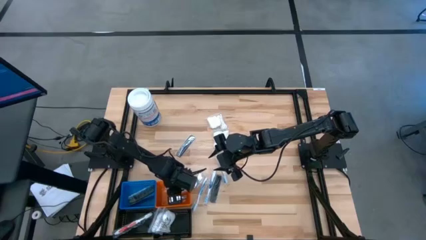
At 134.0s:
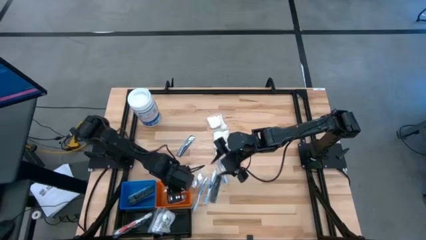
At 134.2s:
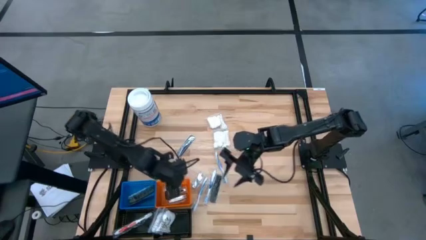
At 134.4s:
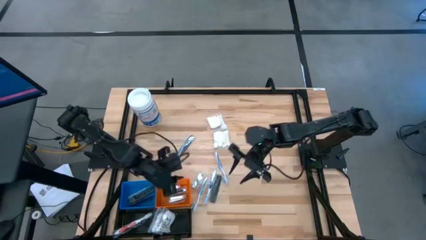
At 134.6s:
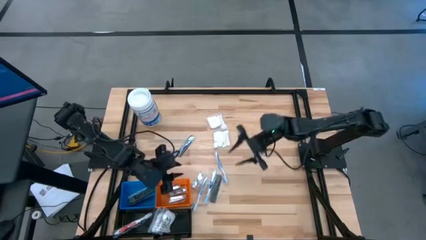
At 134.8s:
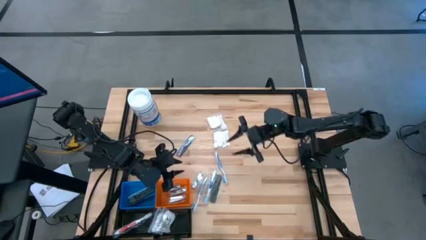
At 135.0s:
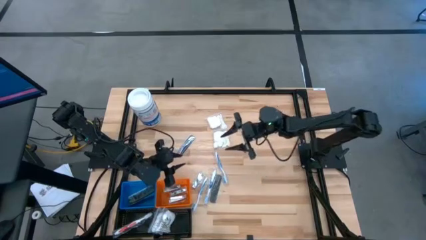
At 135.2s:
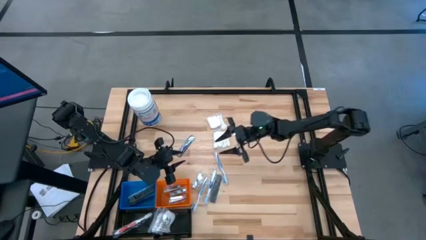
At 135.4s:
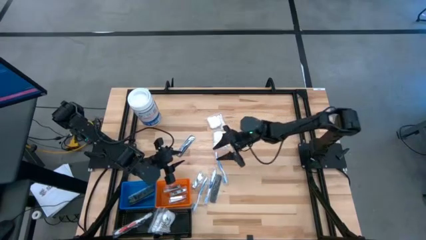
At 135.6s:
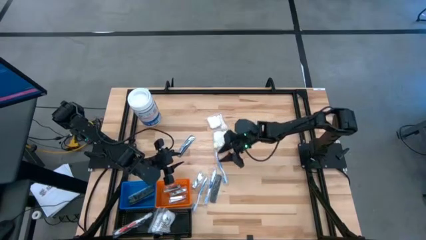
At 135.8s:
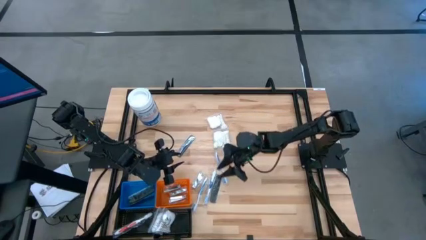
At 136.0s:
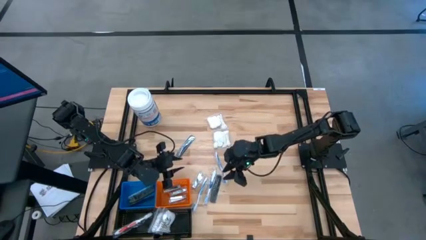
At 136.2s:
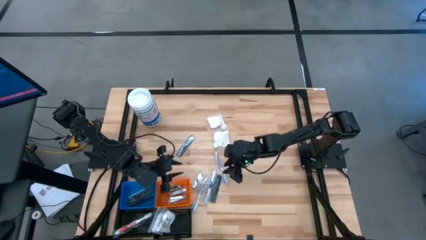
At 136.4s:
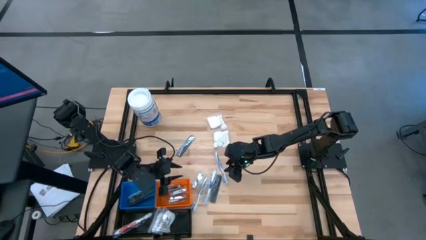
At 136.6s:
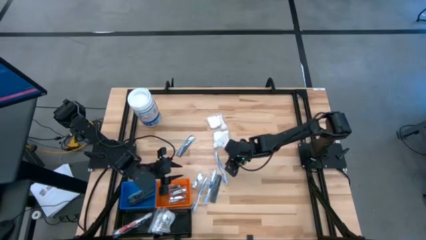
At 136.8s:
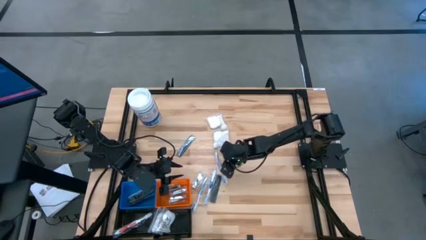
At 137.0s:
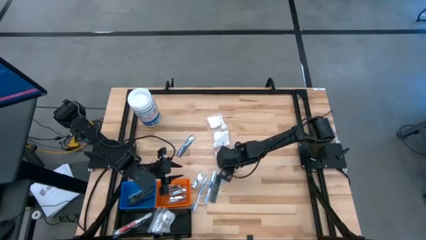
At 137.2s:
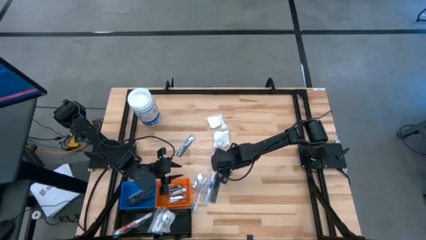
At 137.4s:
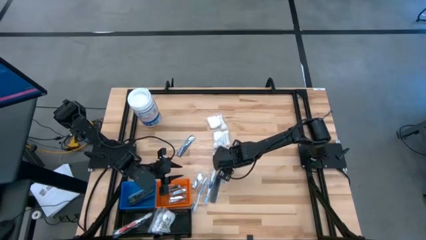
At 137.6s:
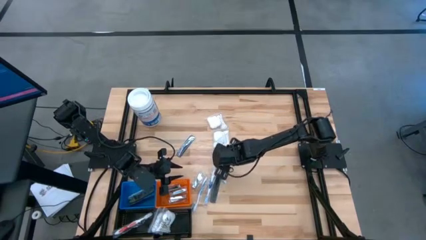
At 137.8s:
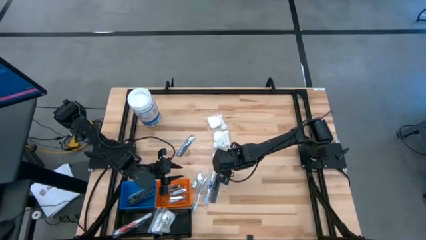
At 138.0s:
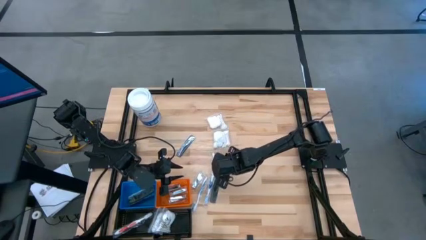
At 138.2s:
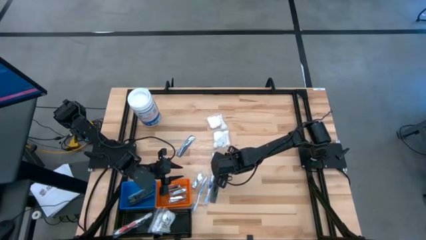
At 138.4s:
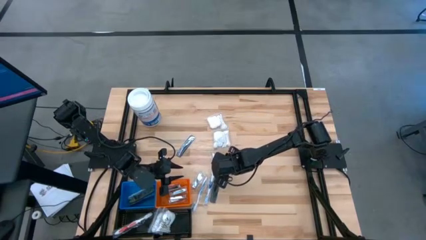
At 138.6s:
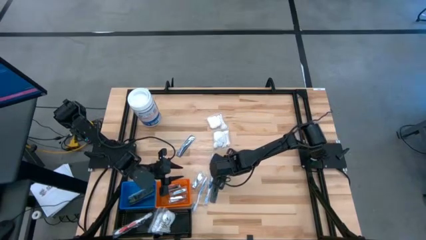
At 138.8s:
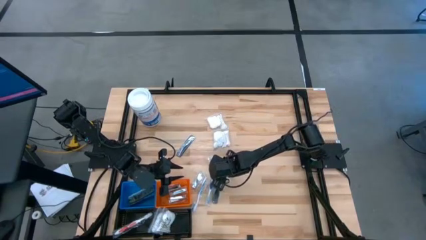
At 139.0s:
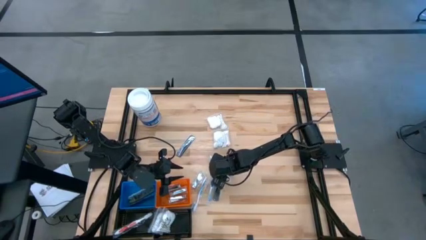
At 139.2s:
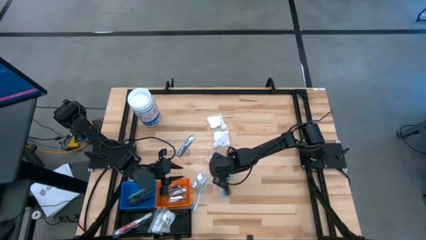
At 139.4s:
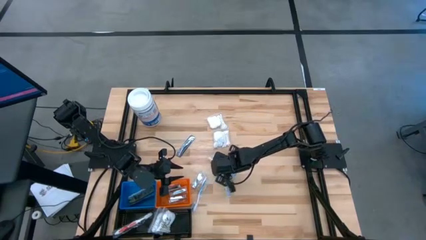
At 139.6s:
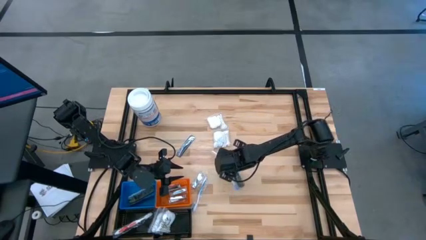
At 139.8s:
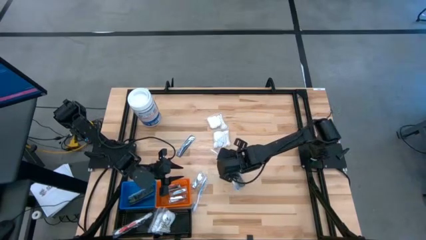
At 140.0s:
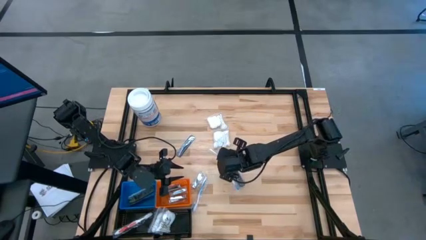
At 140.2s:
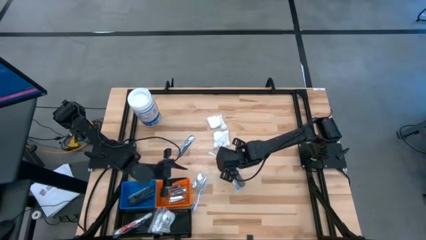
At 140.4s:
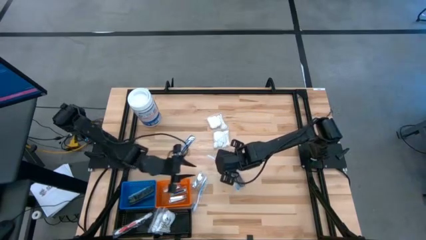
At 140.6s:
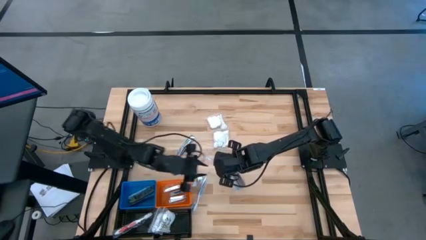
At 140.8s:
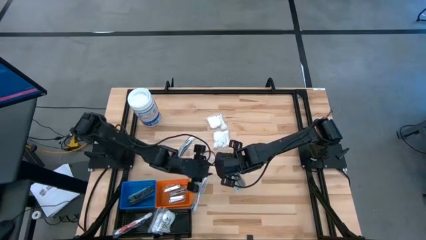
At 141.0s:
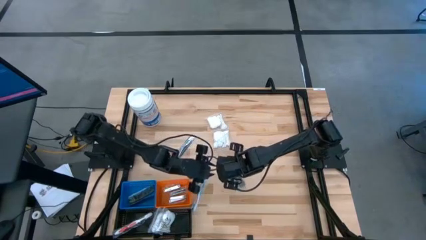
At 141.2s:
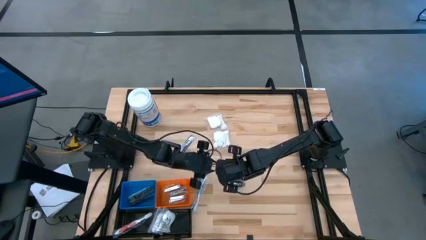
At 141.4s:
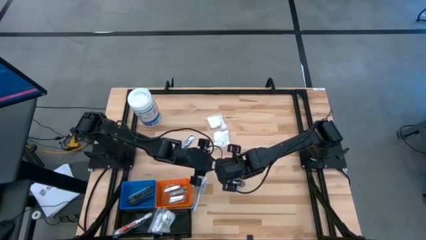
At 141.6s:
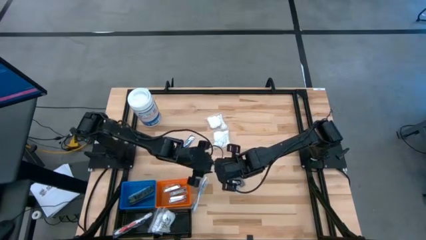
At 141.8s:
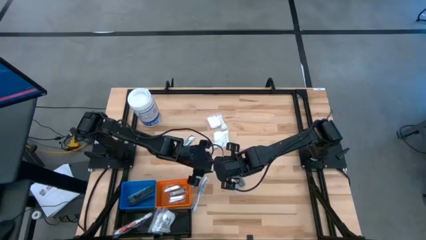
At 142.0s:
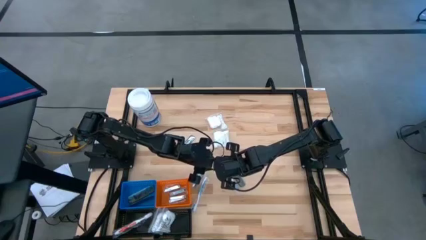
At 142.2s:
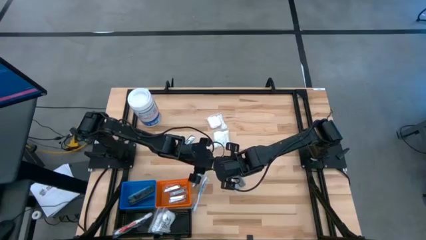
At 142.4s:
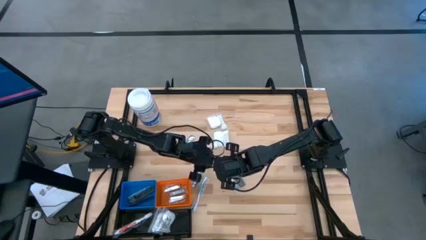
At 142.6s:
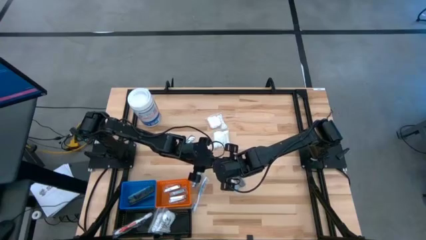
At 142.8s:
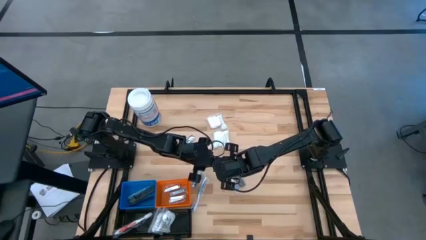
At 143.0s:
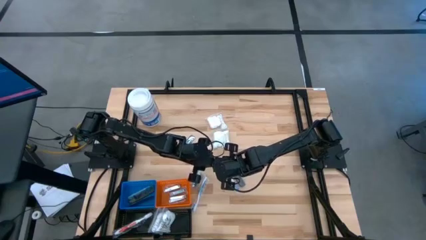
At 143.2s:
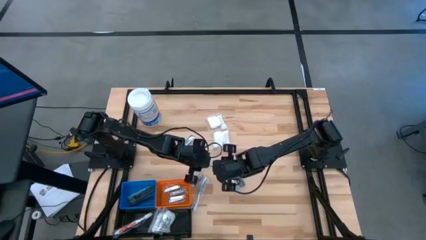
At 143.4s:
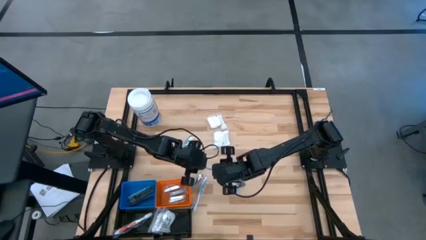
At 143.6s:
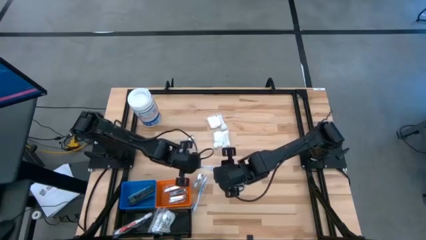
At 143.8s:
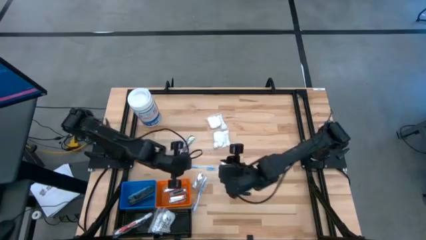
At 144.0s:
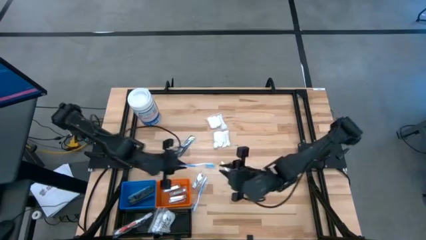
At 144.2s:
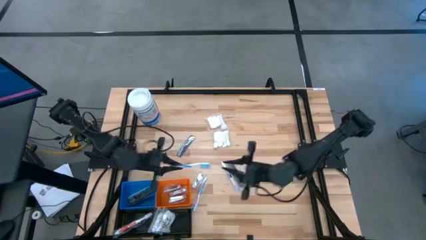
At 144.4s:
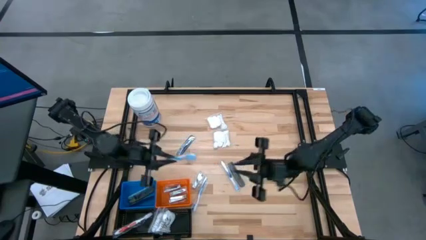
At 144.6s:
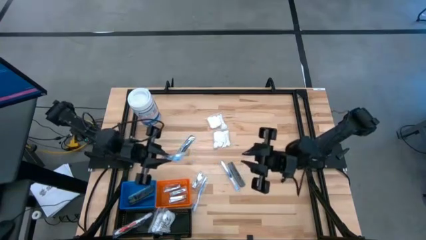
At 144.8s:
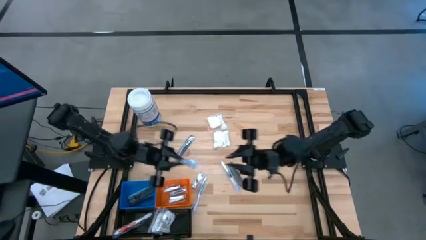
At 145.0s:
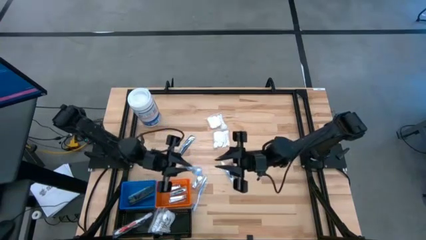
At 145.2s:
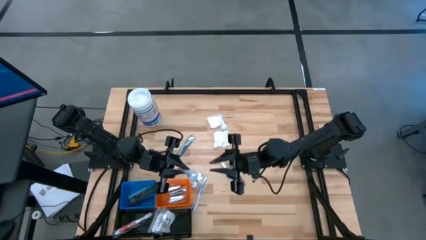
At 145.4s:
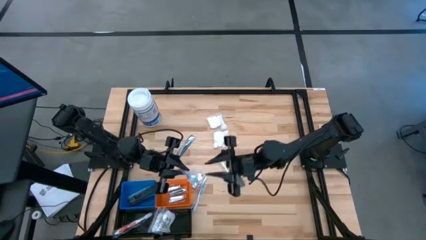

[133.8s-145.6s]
Task: Pick & Place Travel size toiletries
Put the right blue toothbrush into the left black basket

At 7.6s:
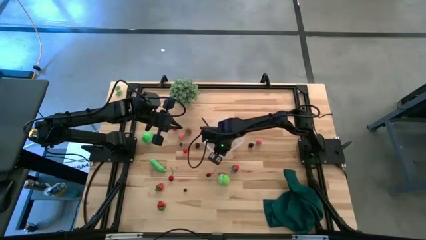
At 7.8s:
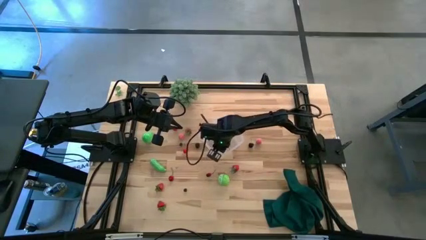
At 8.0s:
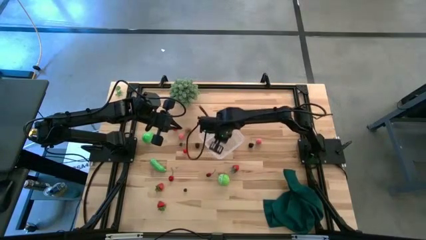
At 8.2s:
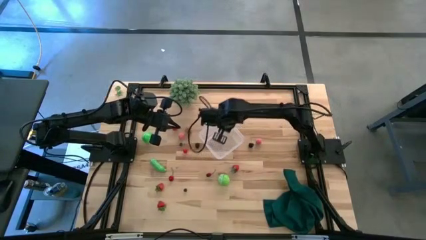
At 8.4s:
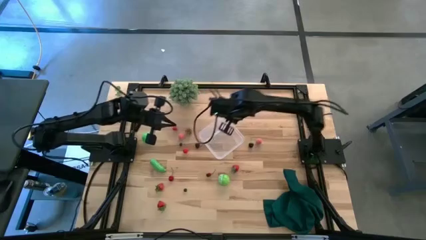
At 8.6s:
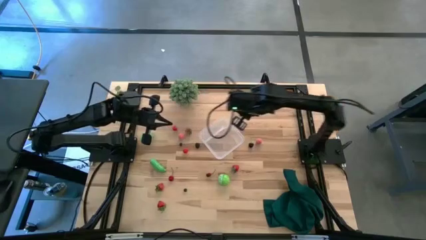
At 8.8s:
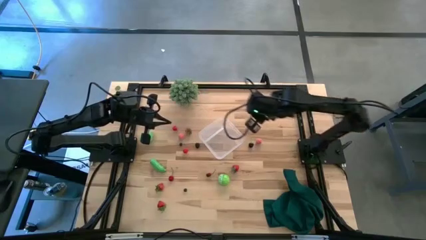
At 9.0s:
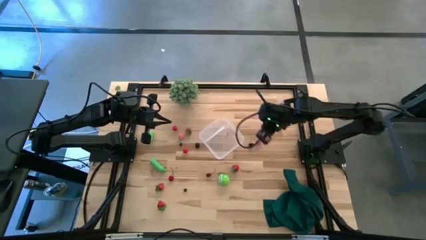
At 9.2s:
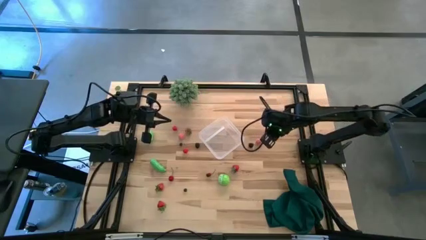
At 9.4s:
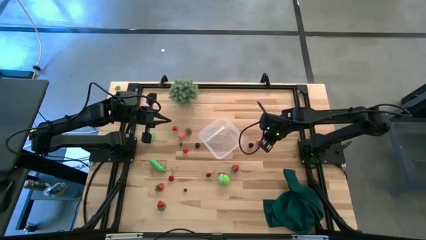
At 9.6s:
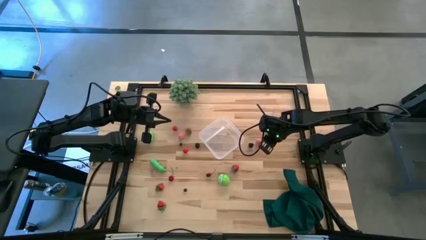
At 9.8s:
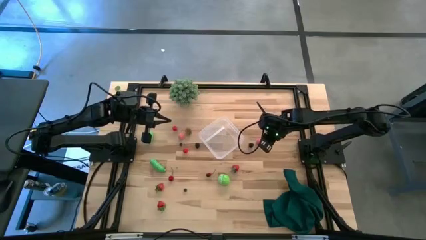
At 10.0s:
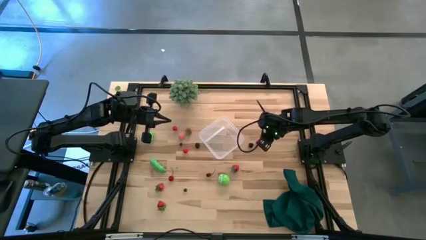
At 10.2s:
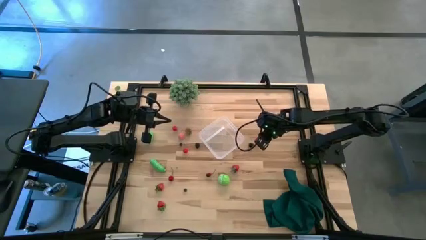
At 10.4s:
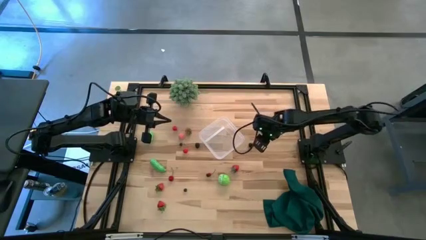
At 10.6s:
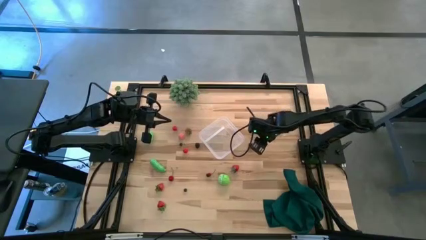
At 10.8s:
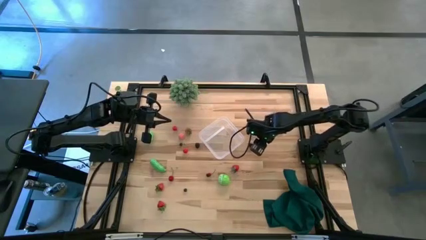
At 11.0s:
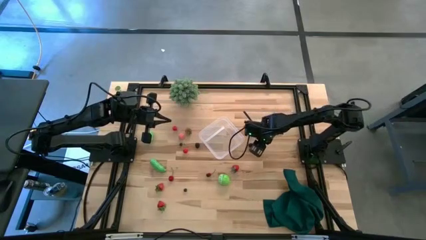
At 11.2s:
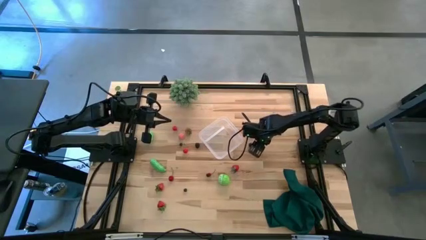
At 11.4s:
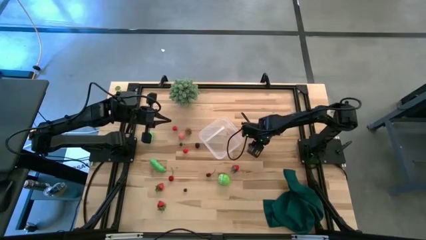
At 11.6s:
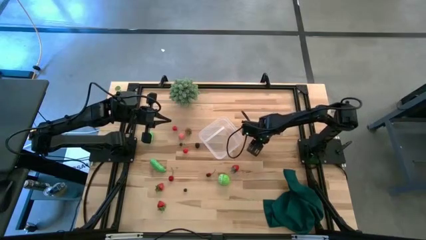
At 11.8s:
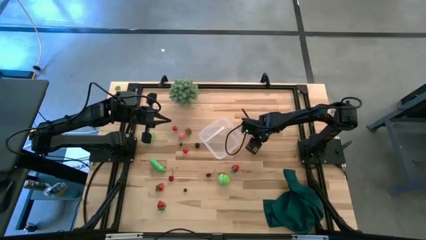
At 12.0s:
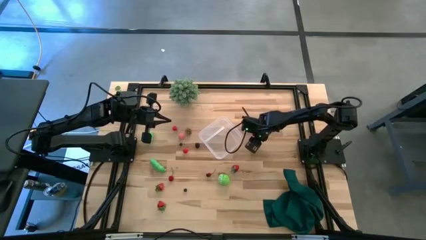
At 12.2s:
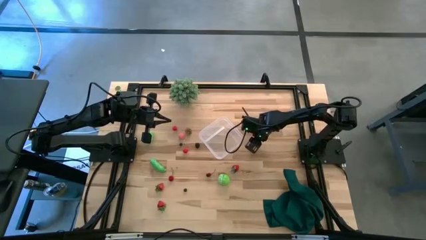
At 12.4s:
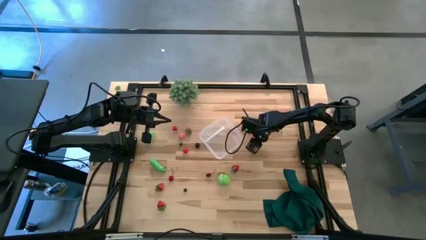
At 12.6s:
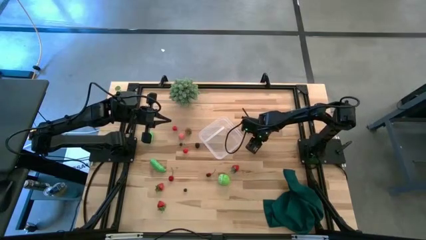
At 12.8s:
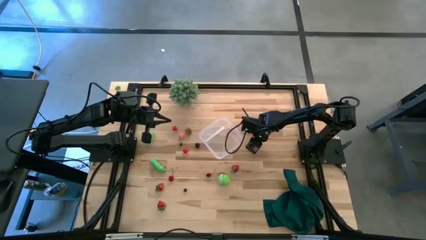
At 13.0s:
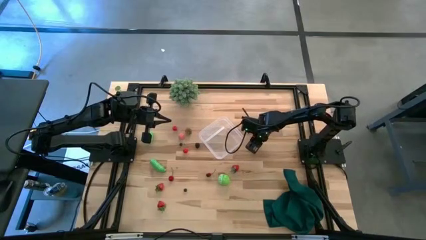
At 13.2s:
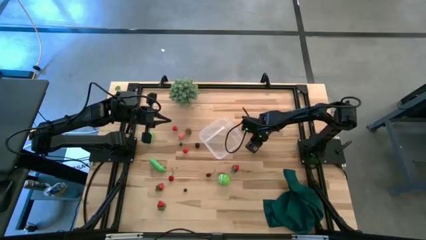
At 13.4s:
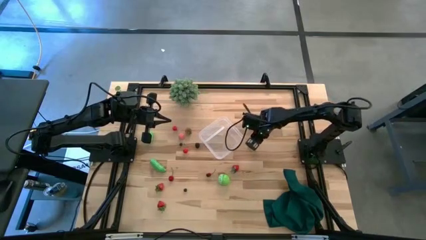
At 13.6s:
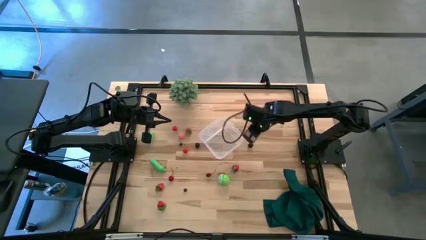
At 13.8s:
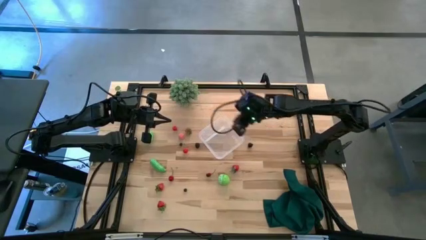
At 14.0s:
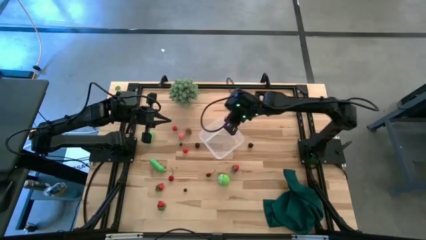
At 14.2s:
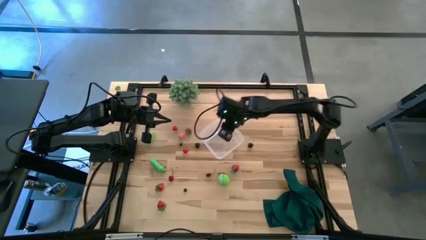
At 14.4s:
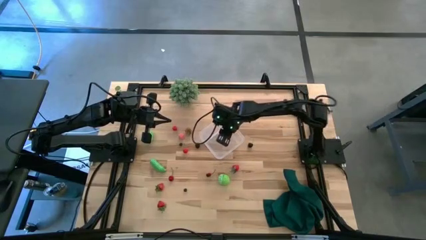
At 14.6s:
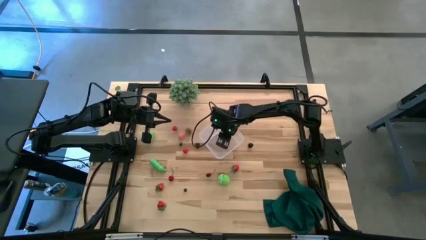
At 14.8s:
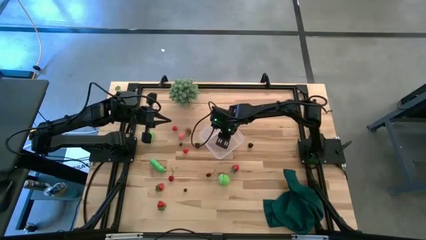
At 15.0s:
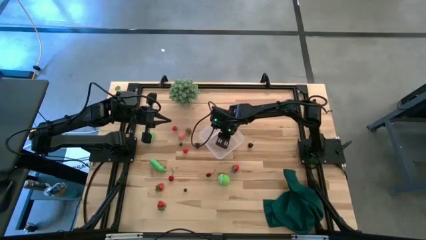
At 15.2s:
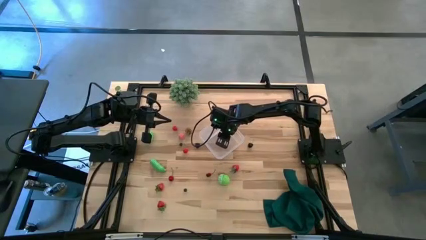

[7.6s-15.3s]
Task: Pick and placing Produce into tupperware
Put the pink peach into the transparent bin
